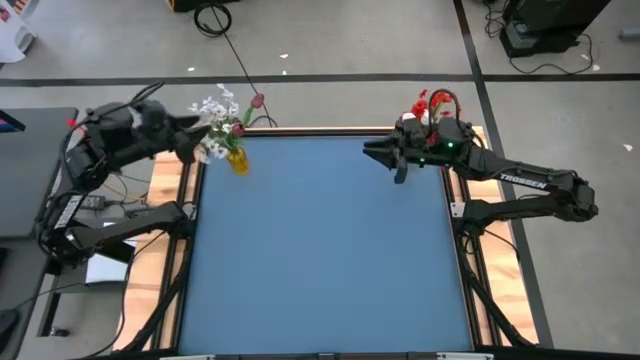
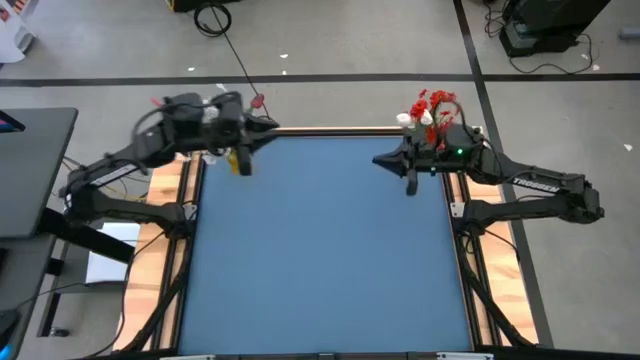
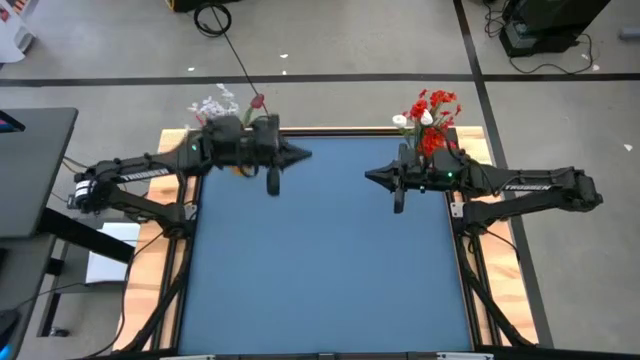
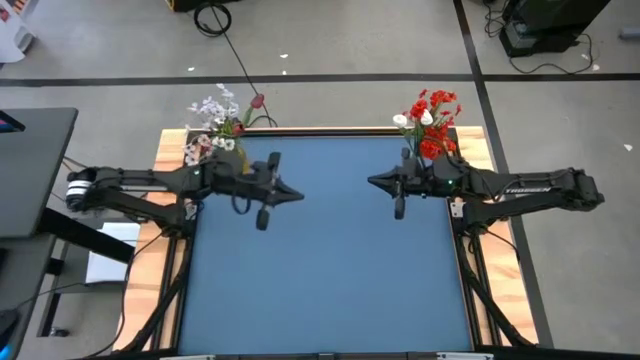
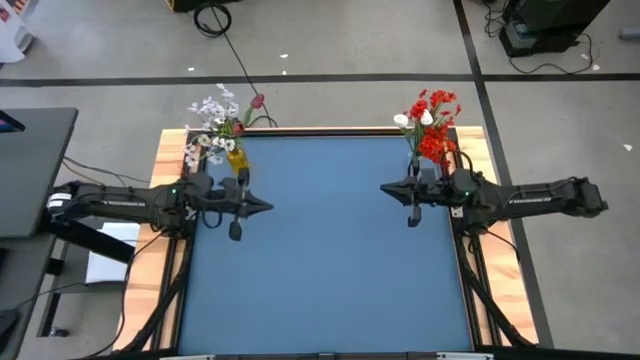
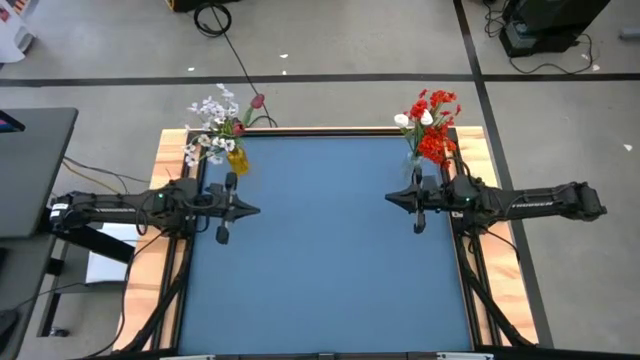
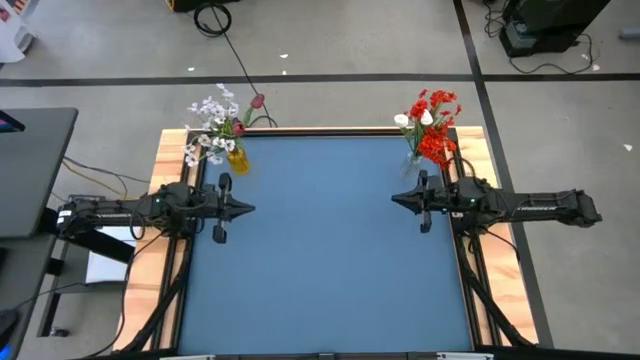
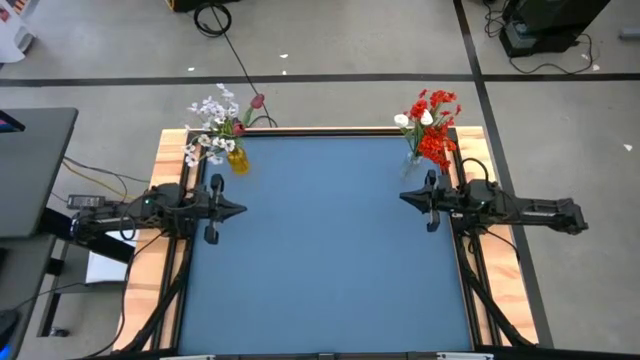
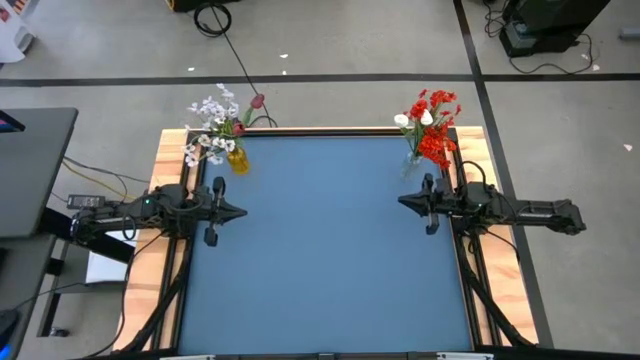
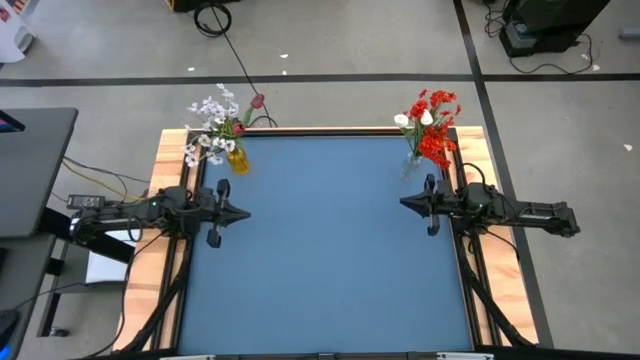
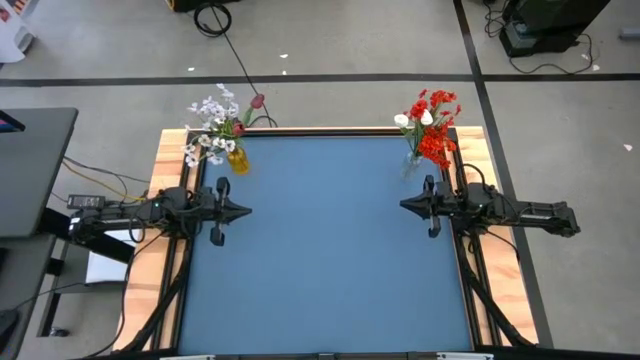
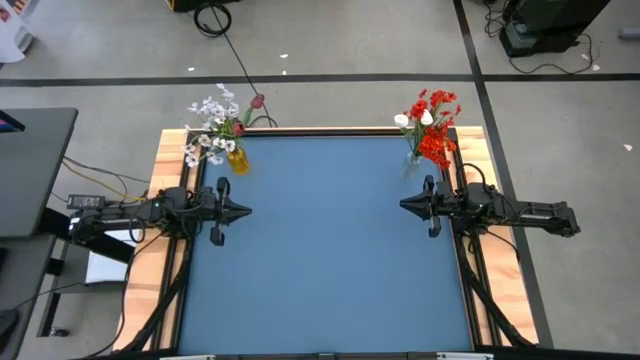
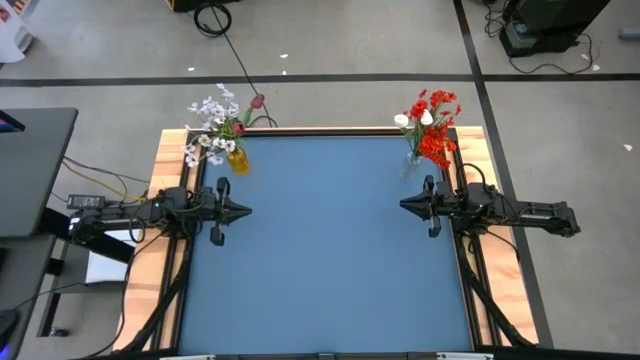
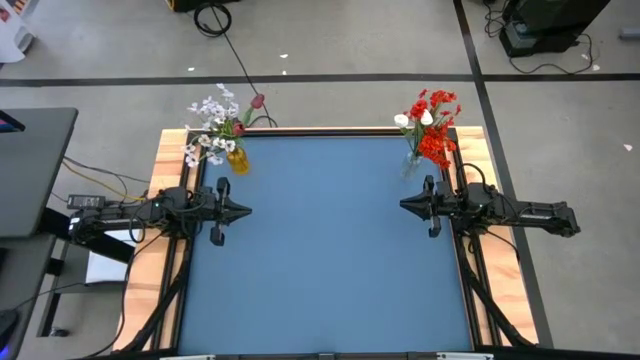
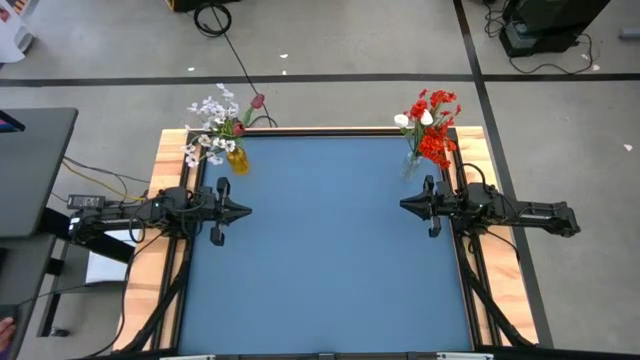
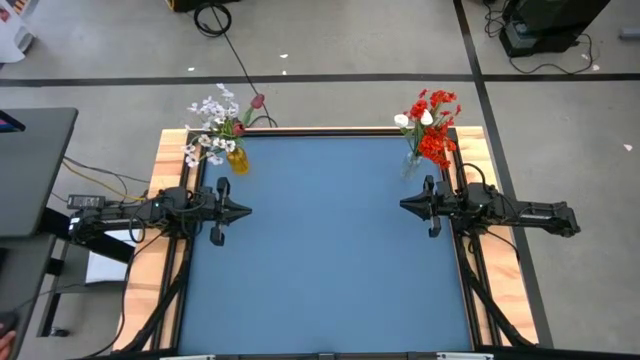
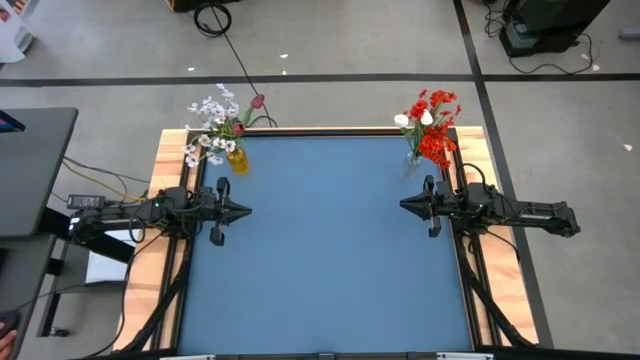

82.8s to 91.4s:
Task: Sort flowers into vase by color
Return to Home Position

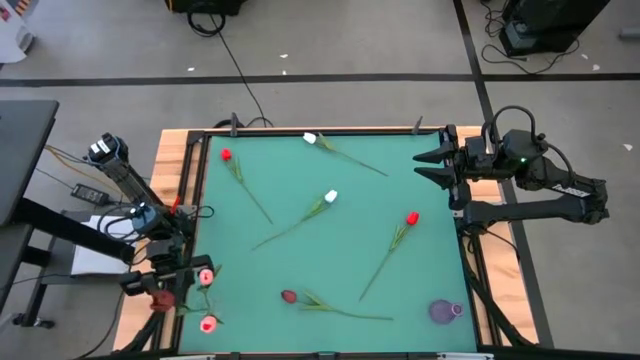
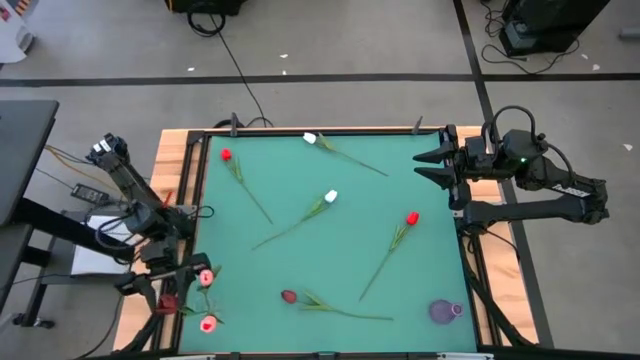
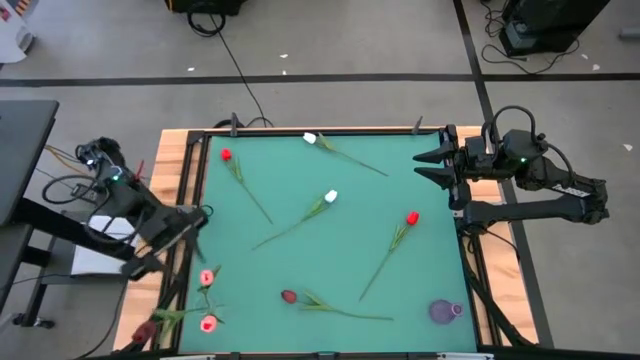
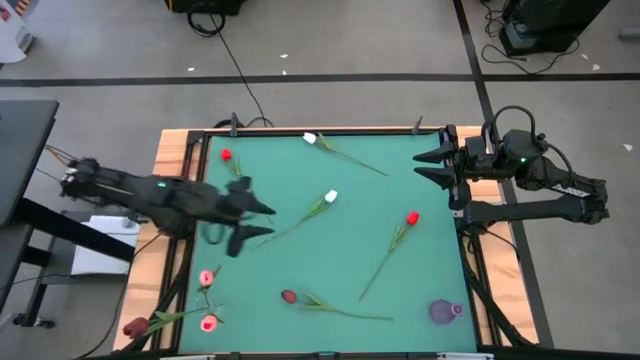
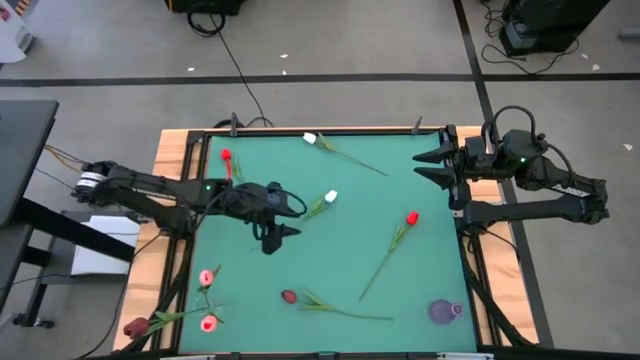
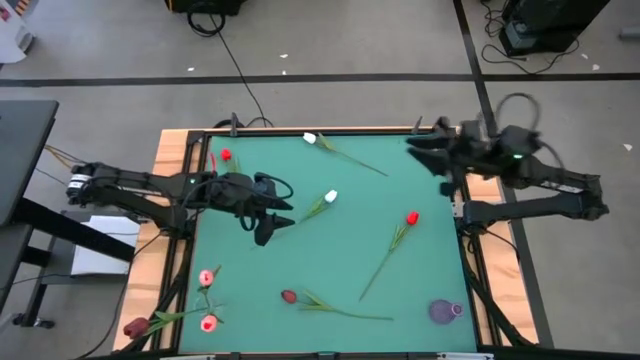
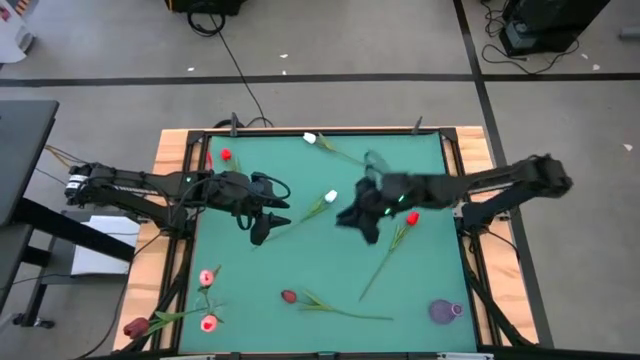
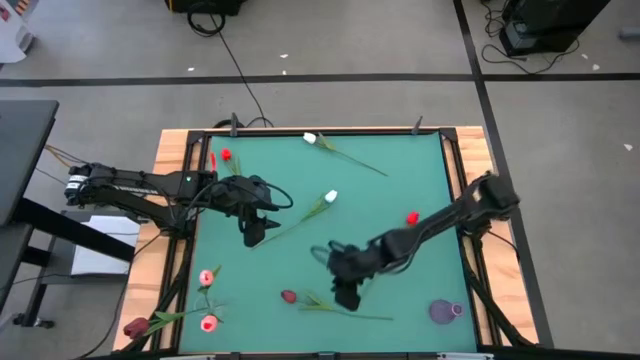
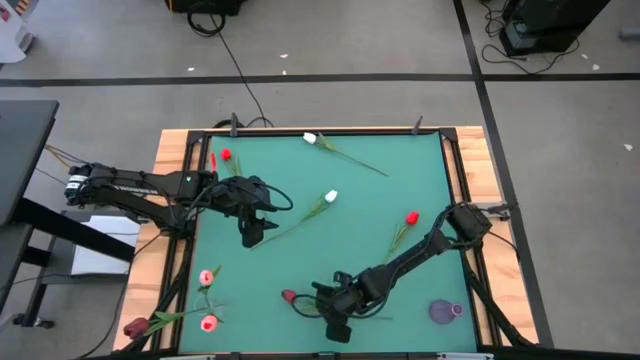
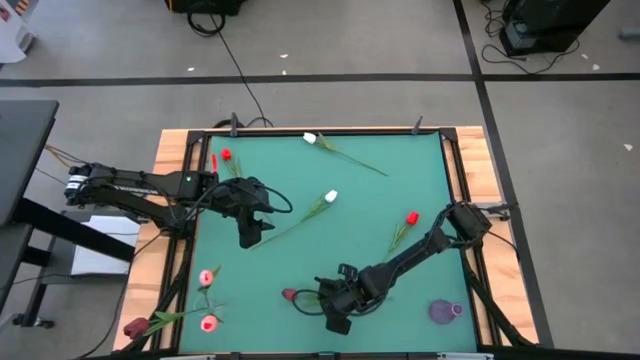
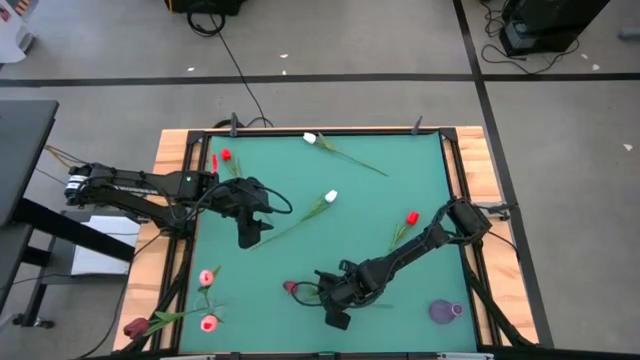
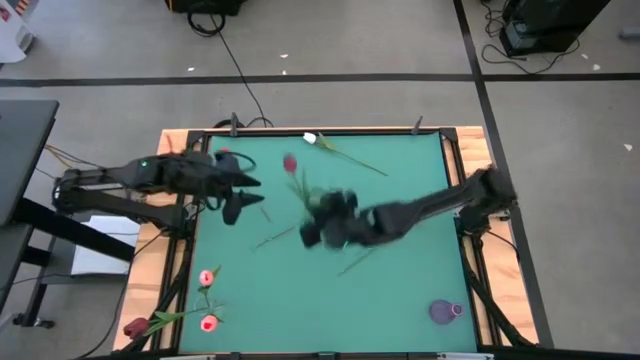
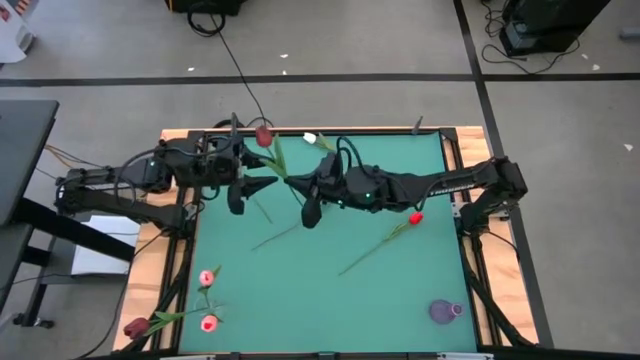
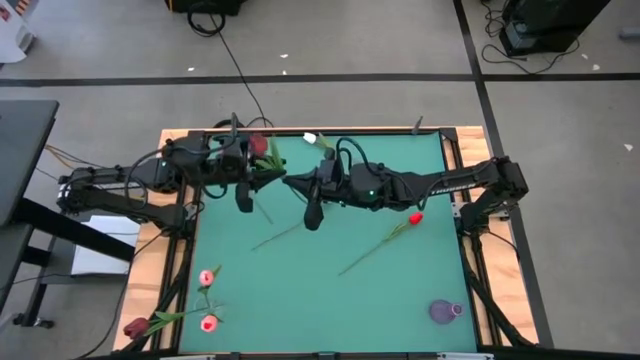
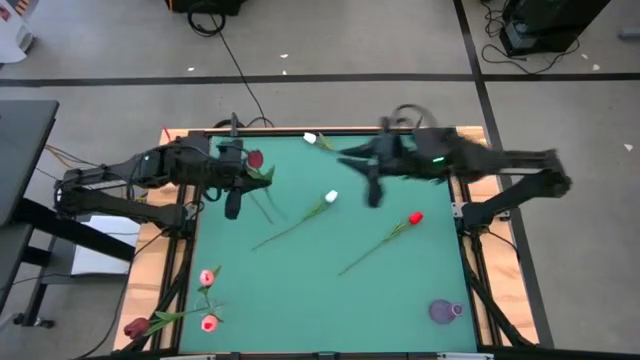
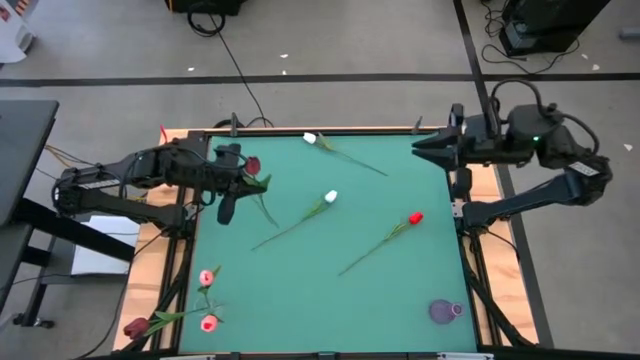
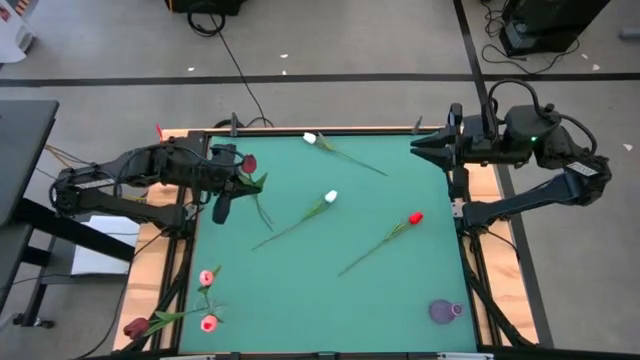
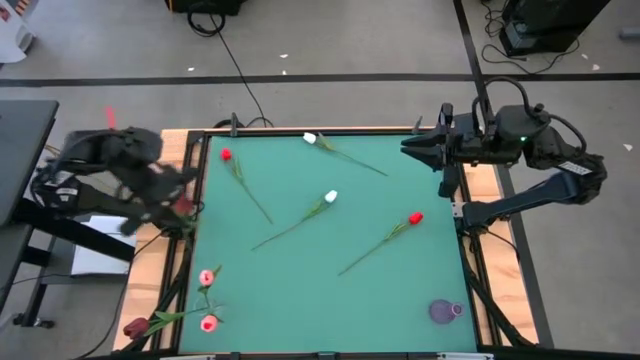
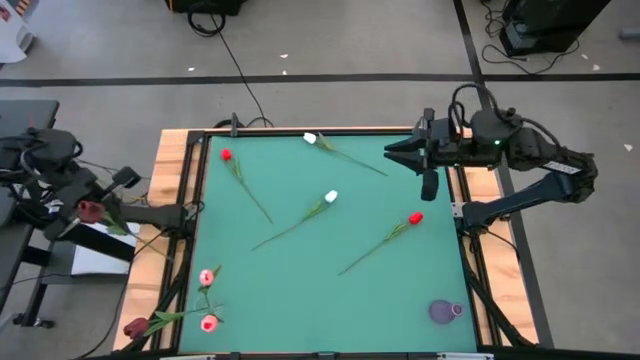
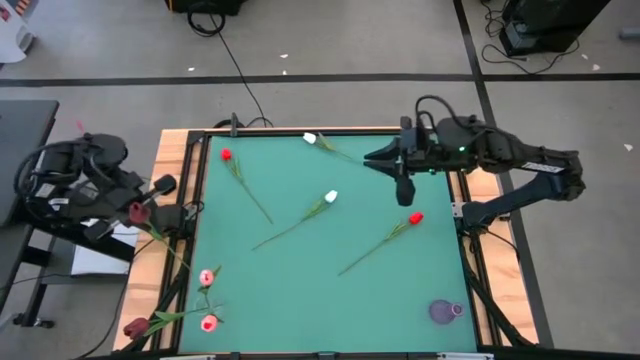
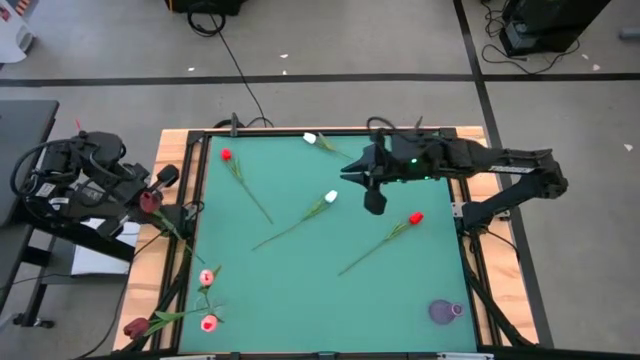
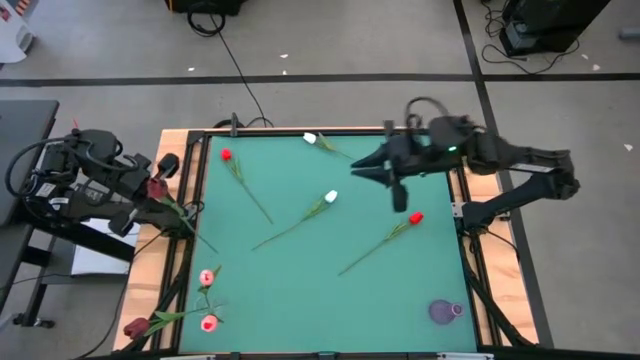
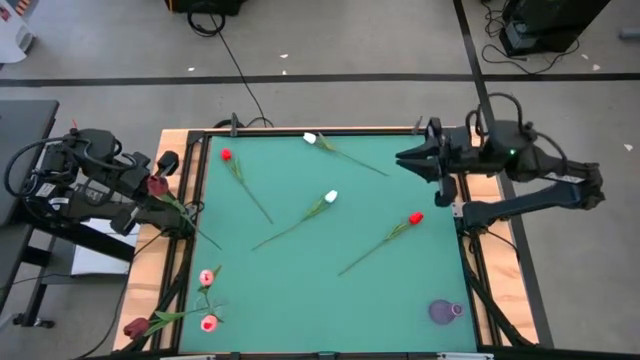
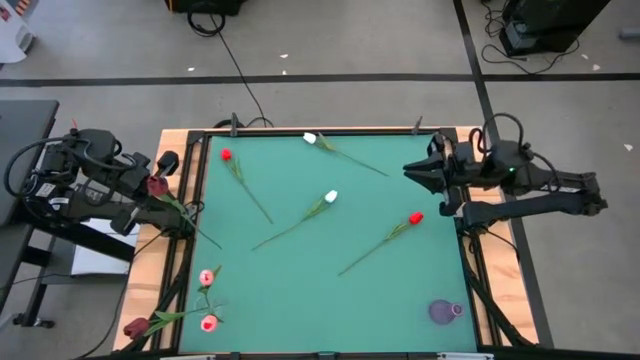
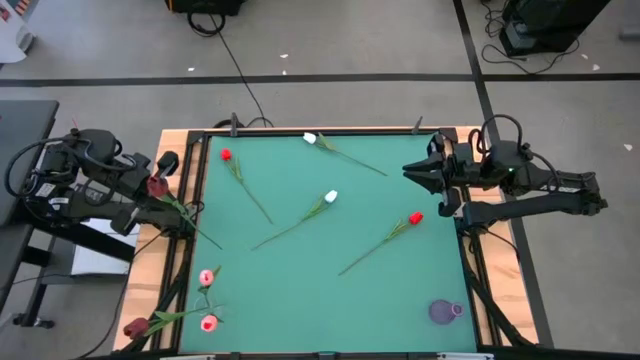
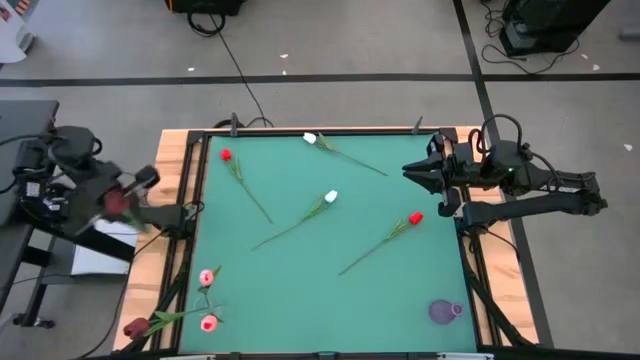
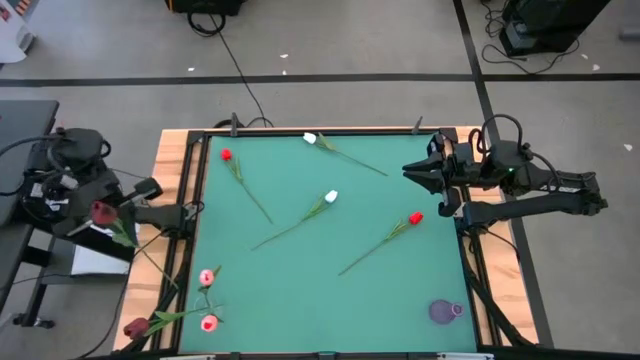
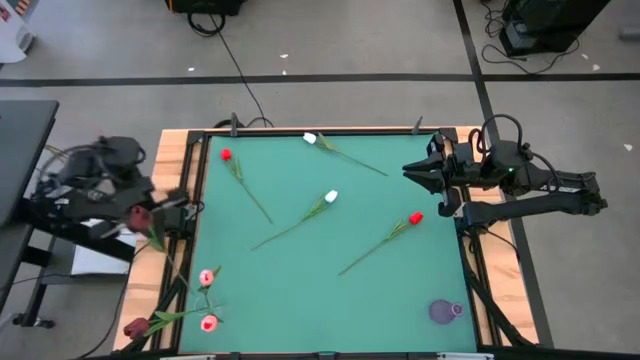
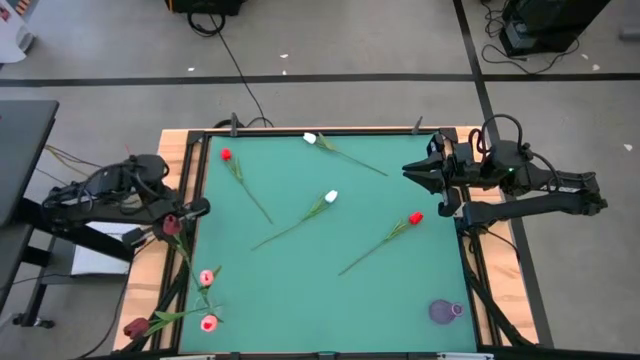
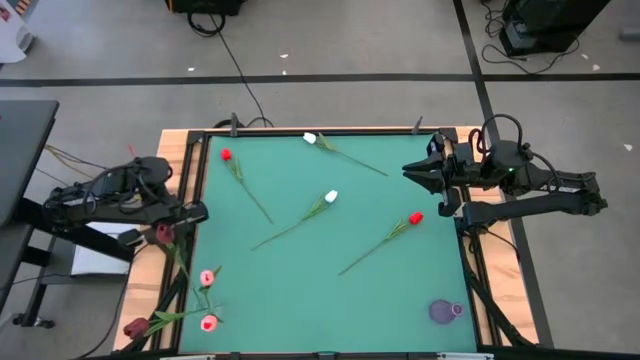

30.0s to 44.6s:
Task: Sort flowers into vase by color
Put the dark red flower into the transparent vase
